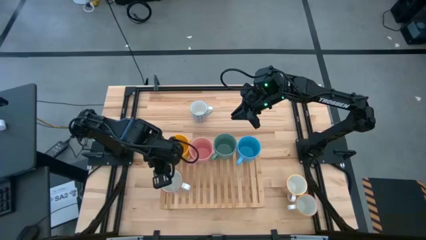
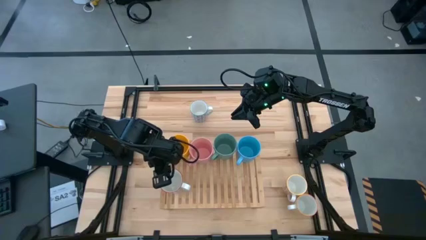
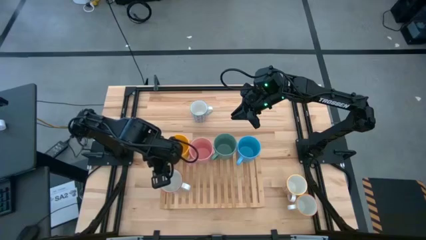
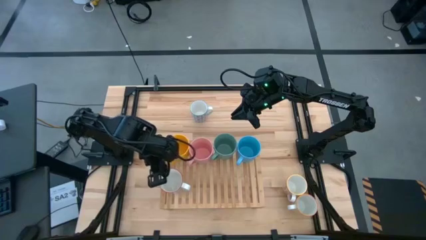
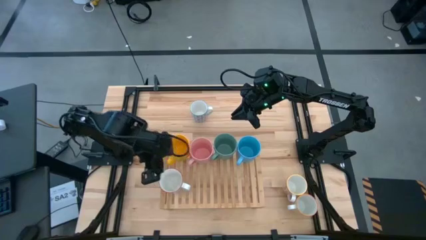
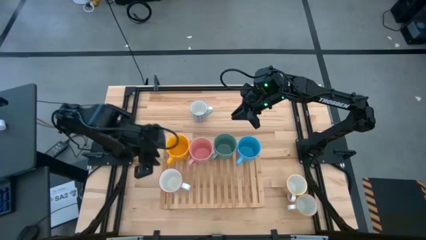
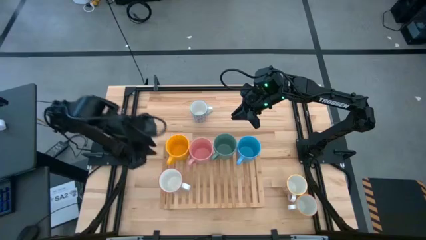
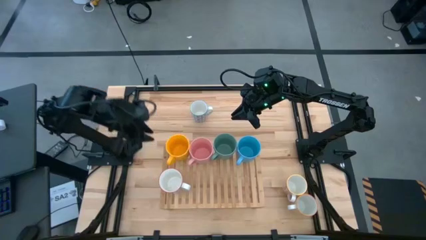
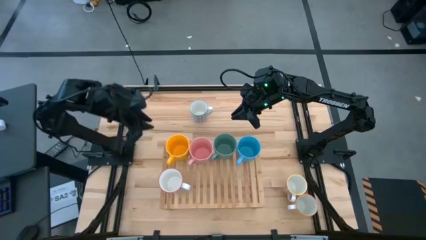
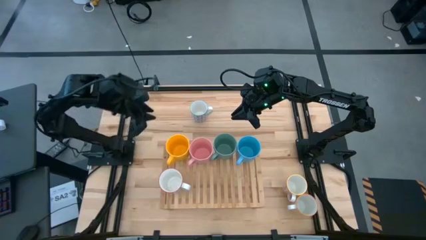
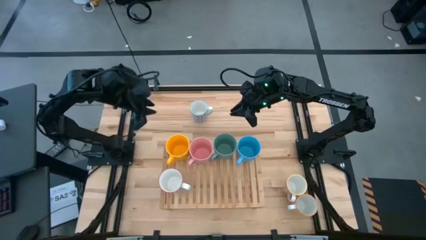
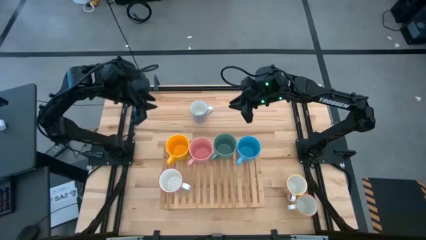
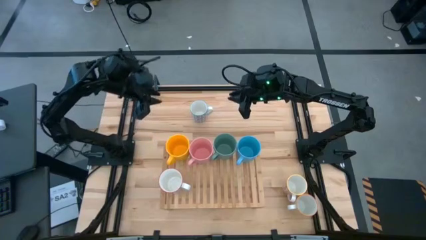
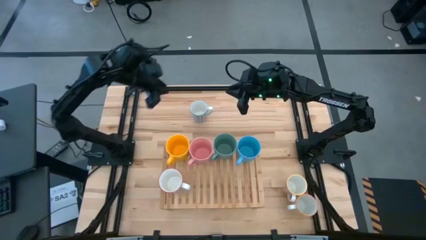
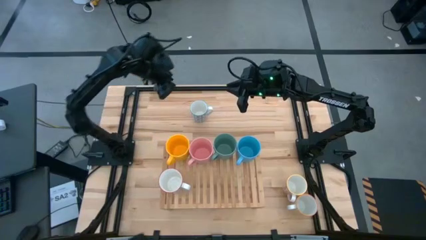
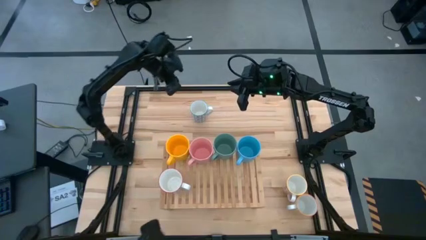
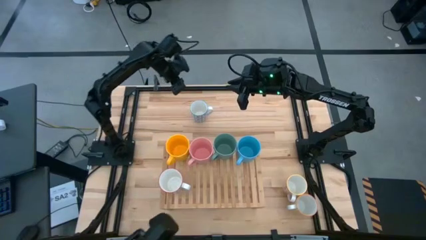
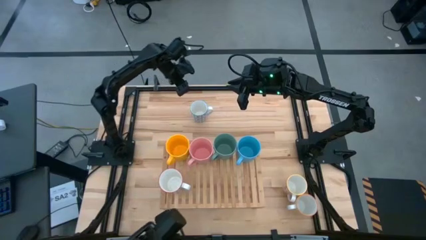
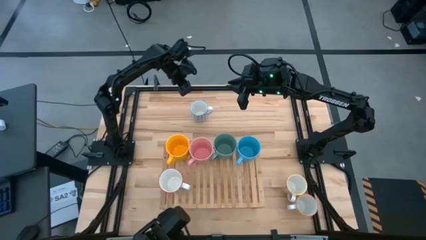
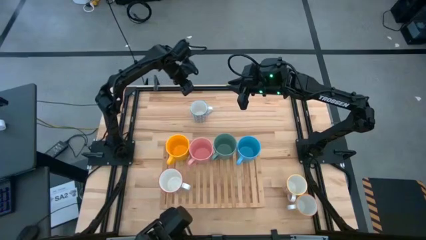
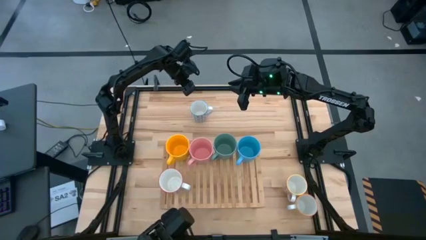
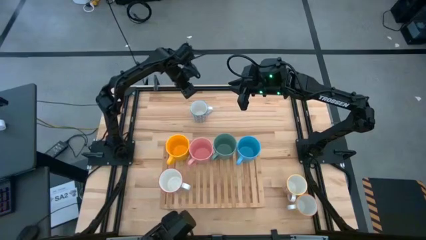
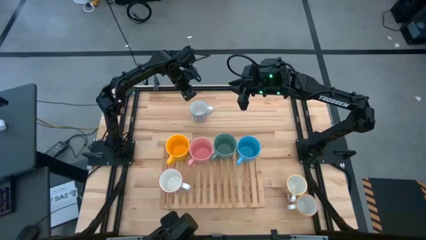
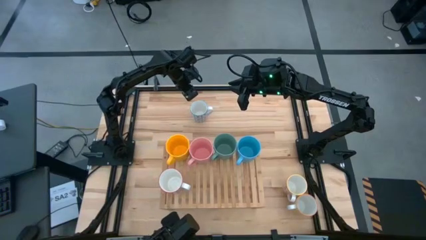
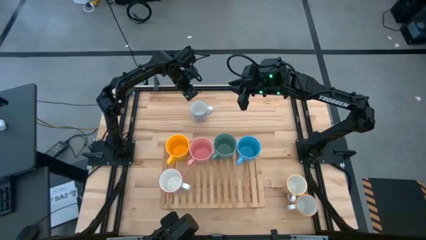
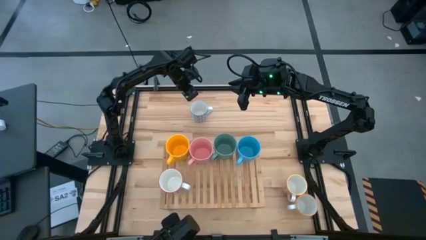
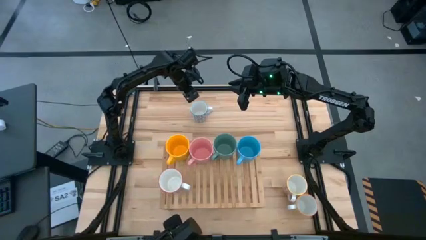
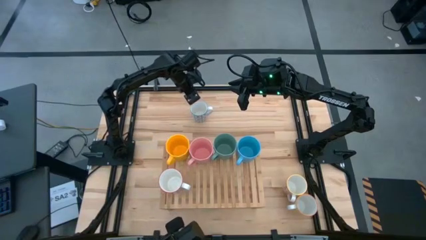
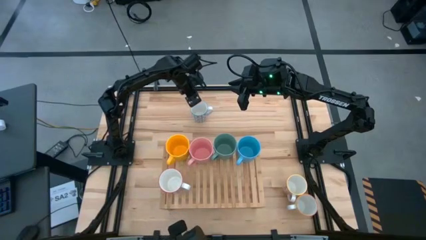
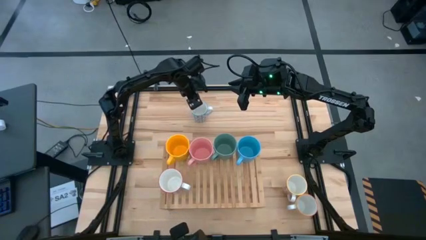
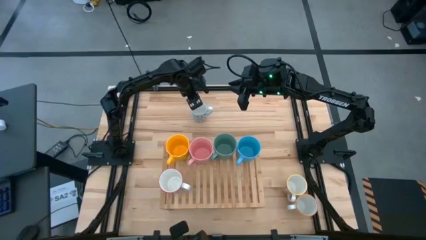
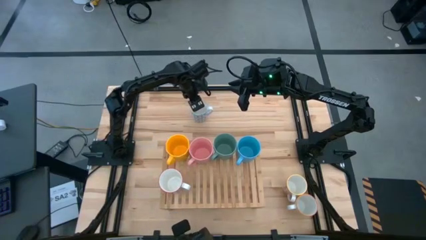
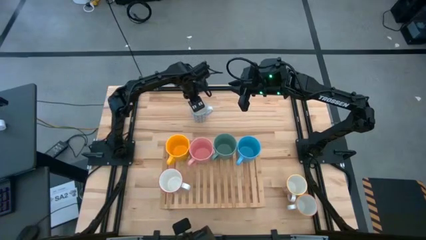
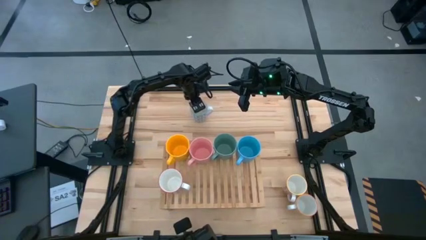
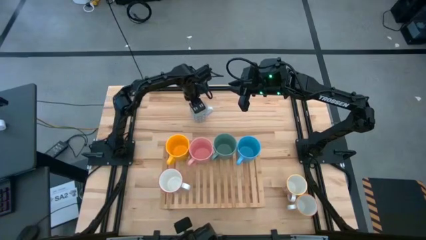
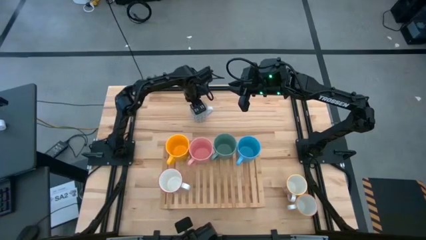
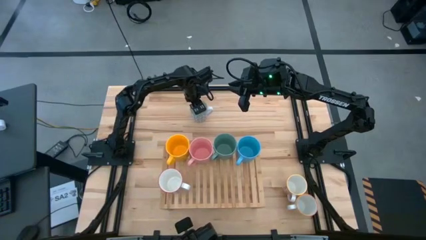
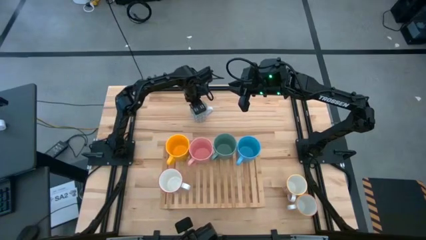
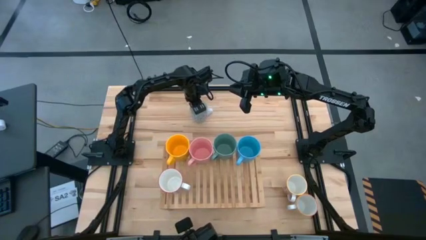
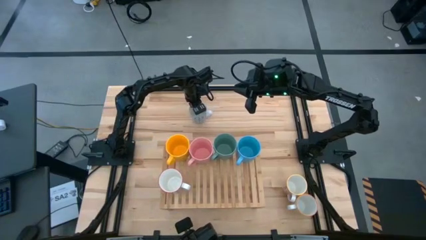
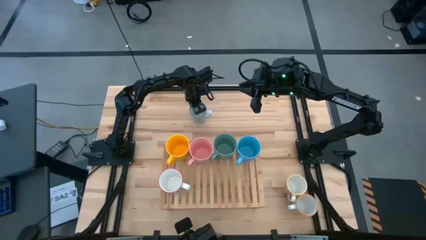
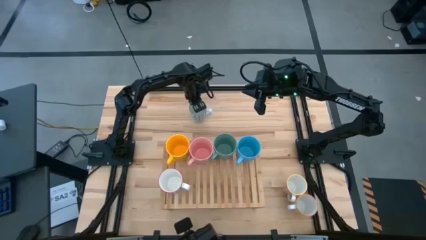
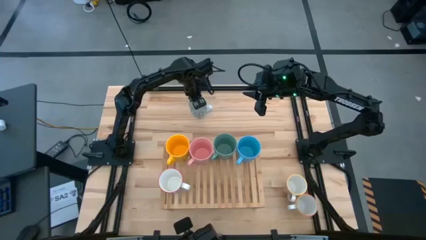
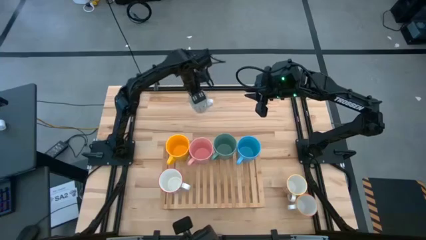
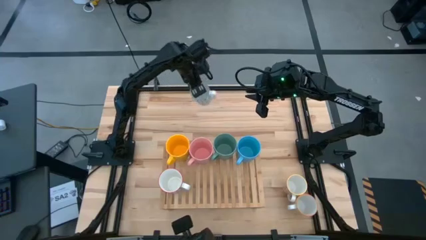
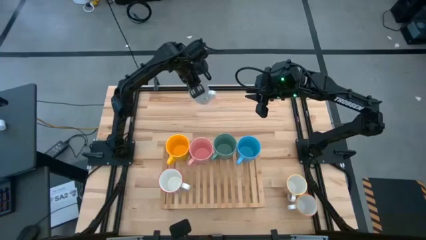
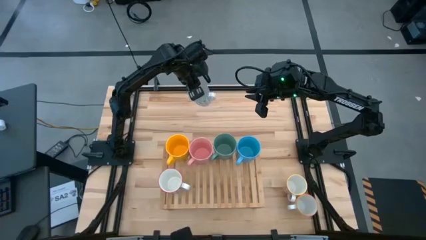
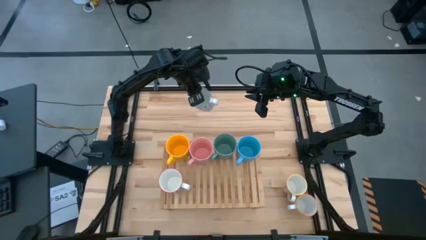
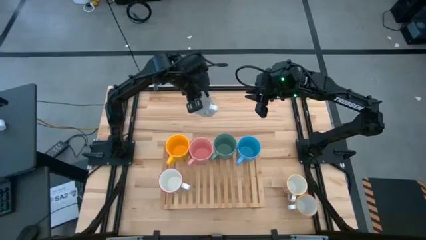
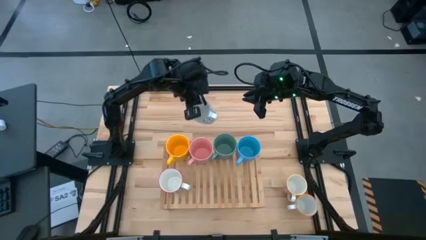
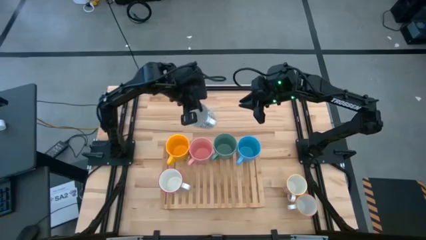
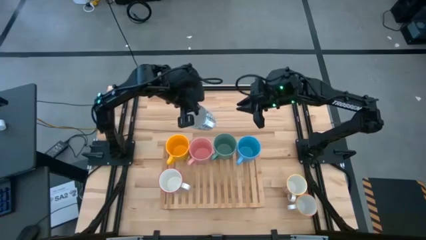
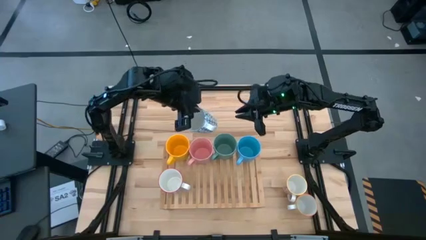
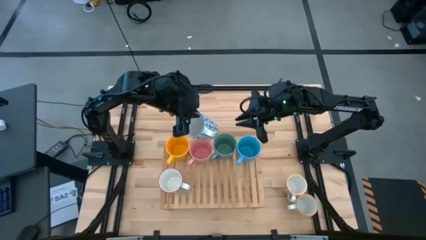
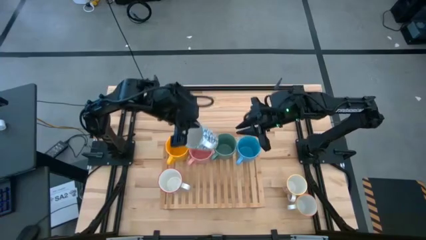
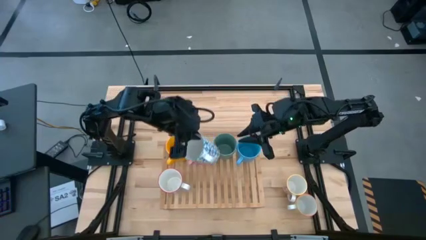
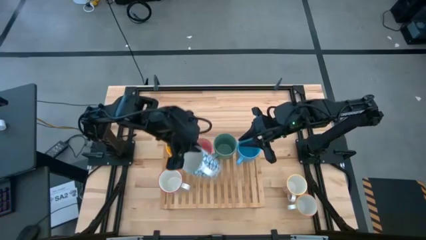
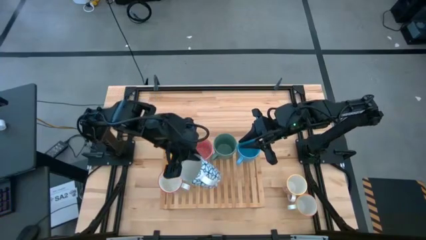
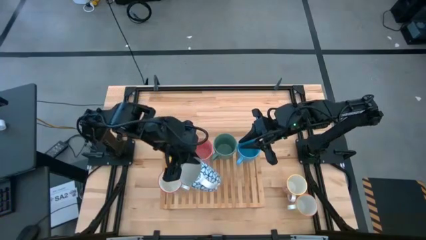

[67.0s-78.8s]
Task: Place coffee mugs
Put the blue patterned mug on the shelf
